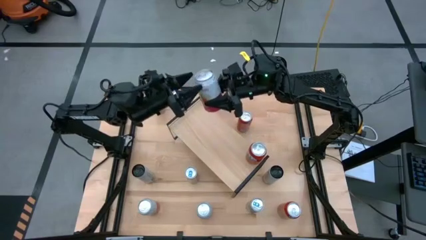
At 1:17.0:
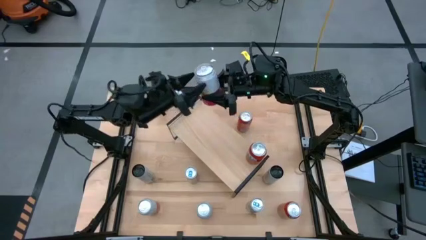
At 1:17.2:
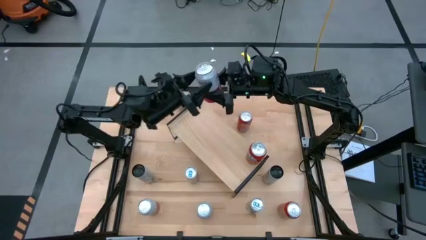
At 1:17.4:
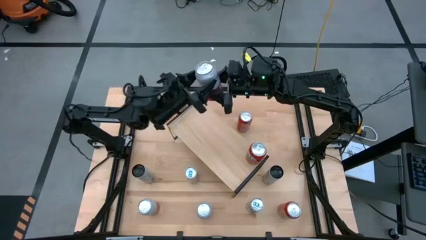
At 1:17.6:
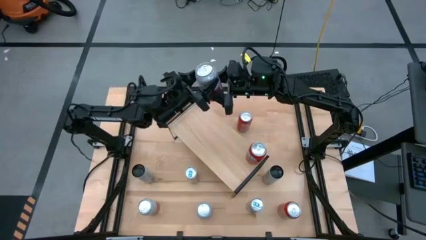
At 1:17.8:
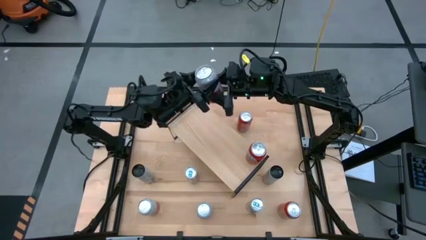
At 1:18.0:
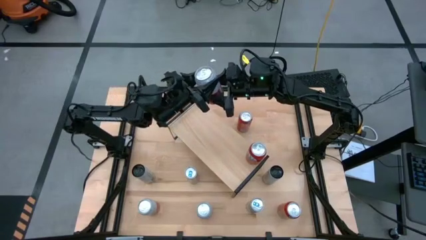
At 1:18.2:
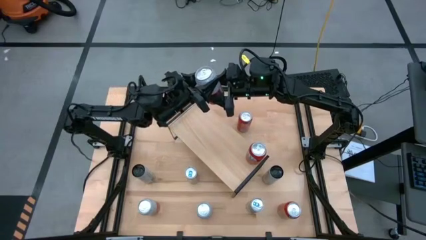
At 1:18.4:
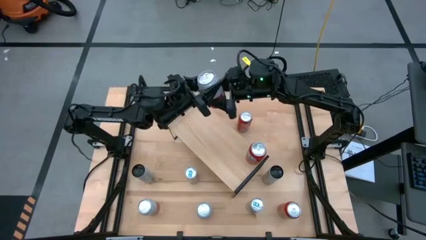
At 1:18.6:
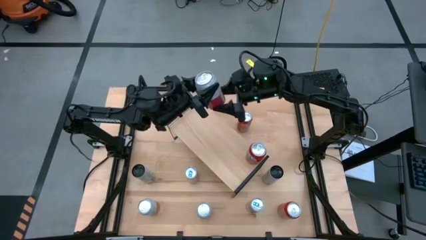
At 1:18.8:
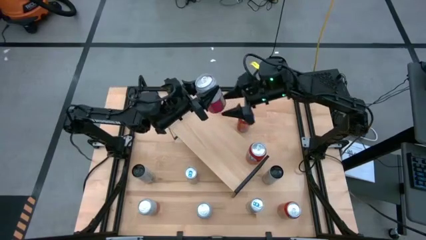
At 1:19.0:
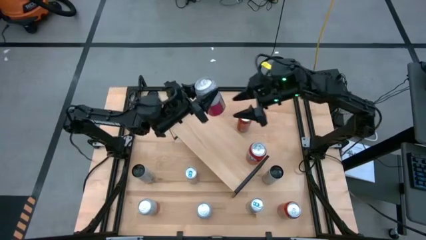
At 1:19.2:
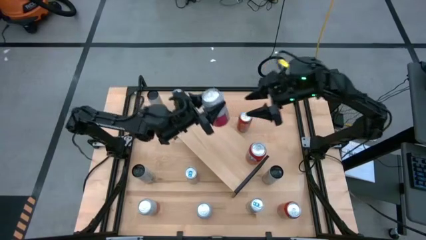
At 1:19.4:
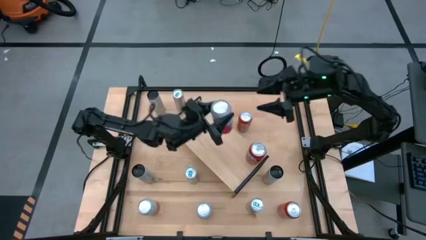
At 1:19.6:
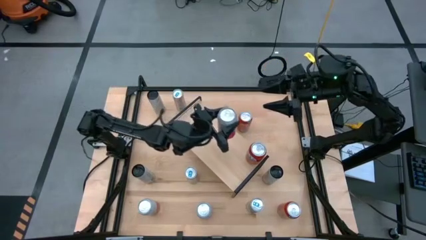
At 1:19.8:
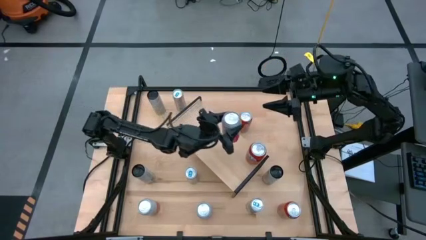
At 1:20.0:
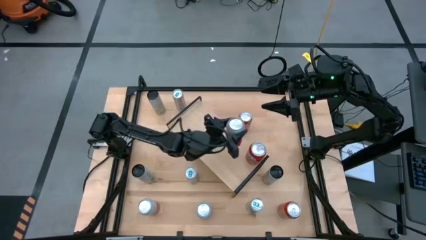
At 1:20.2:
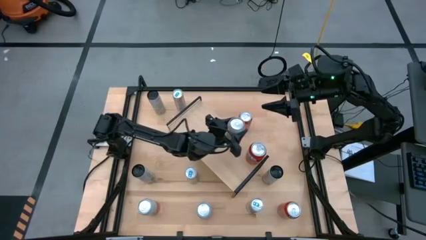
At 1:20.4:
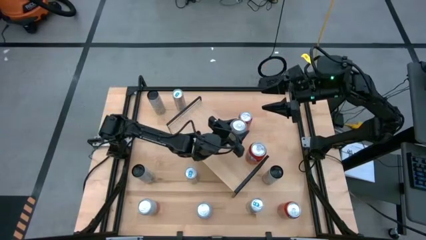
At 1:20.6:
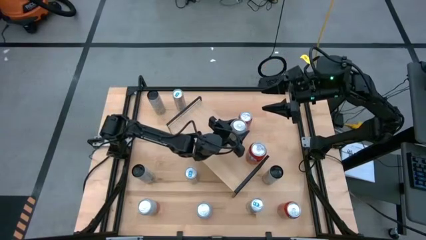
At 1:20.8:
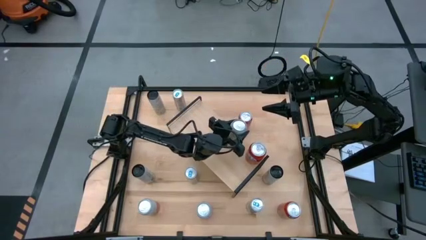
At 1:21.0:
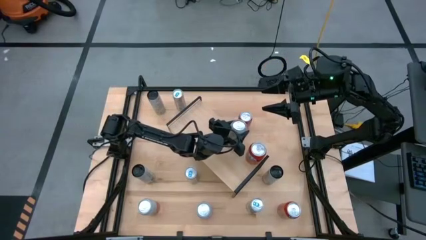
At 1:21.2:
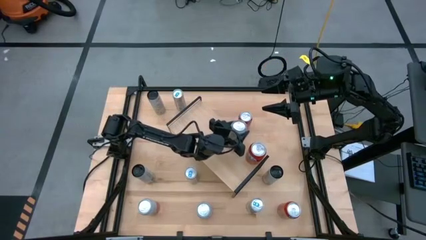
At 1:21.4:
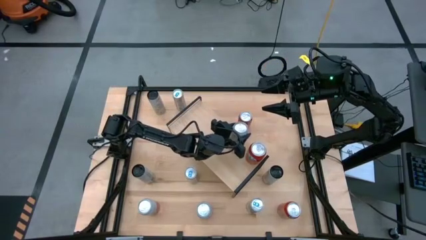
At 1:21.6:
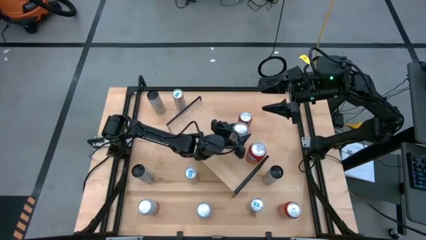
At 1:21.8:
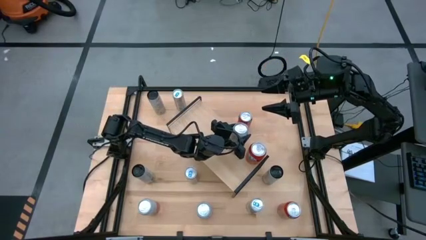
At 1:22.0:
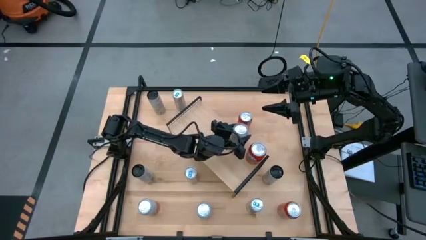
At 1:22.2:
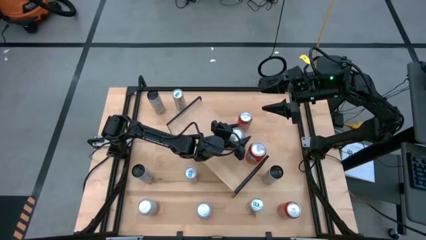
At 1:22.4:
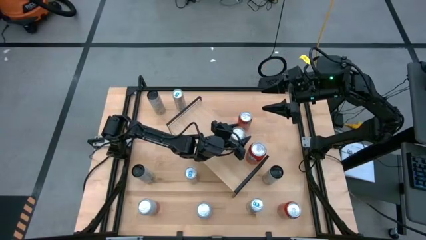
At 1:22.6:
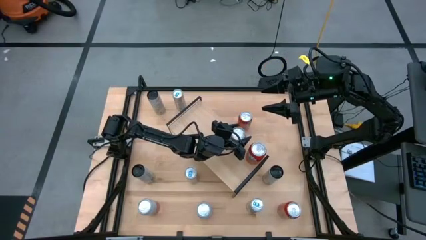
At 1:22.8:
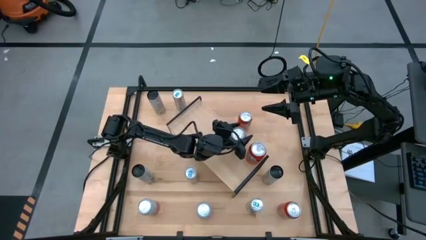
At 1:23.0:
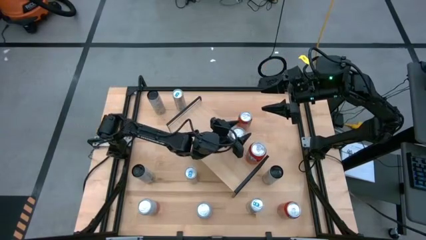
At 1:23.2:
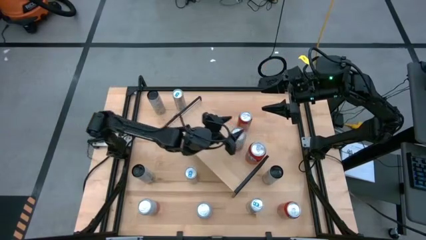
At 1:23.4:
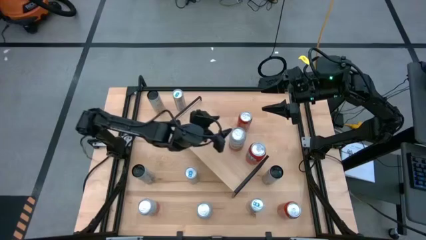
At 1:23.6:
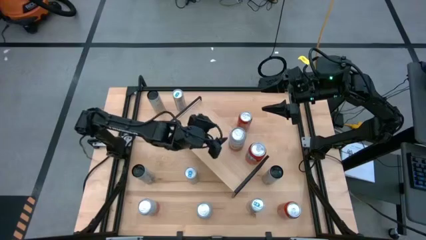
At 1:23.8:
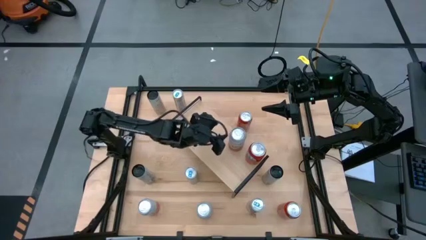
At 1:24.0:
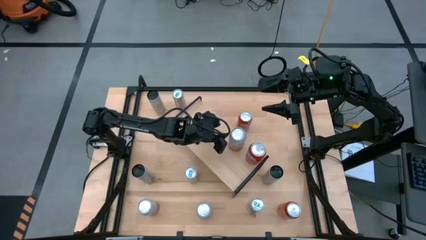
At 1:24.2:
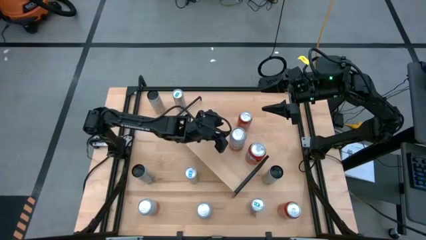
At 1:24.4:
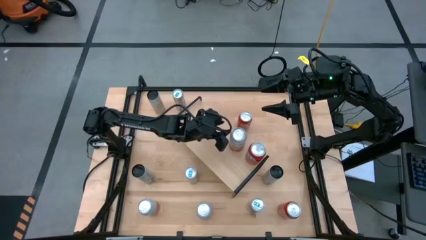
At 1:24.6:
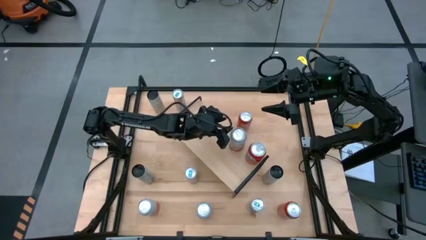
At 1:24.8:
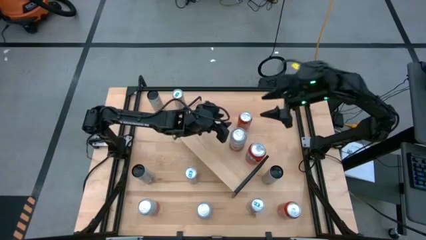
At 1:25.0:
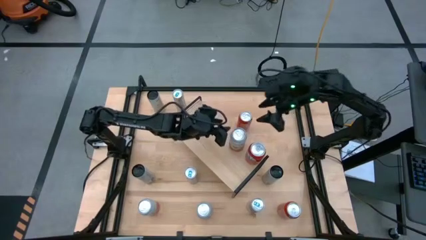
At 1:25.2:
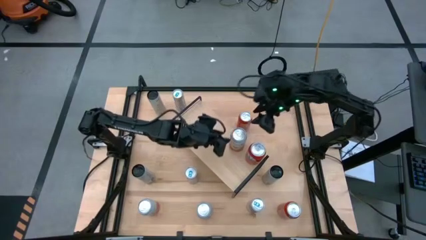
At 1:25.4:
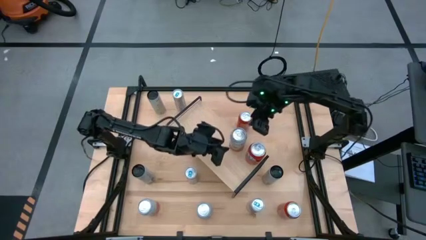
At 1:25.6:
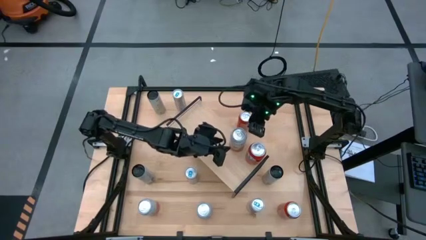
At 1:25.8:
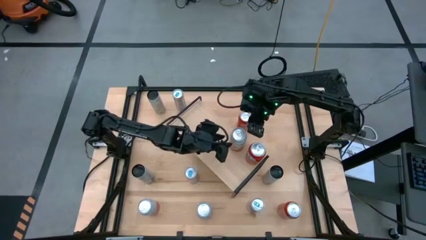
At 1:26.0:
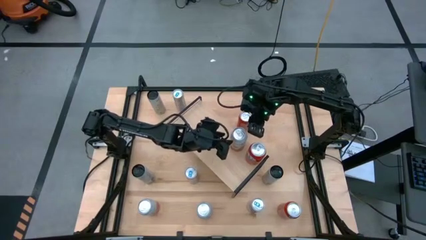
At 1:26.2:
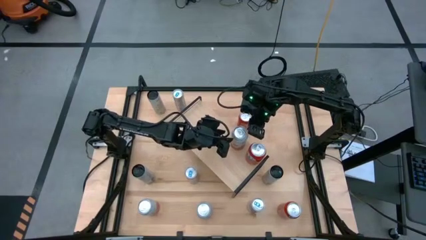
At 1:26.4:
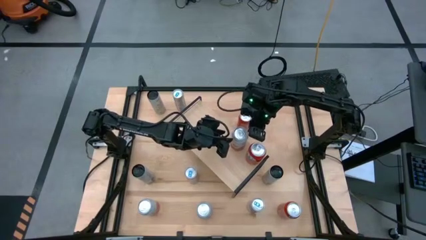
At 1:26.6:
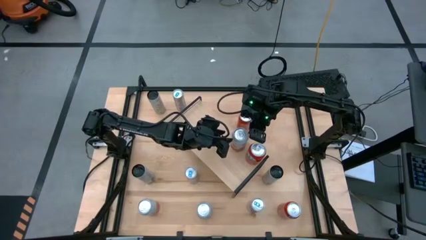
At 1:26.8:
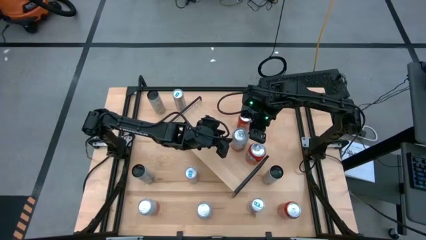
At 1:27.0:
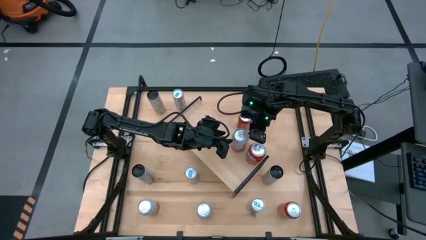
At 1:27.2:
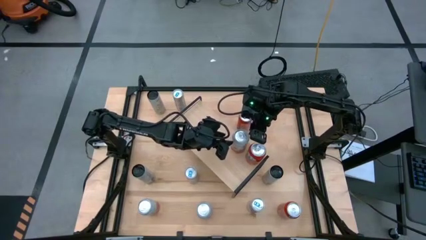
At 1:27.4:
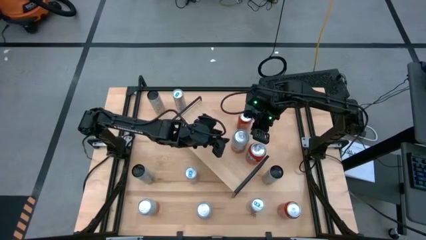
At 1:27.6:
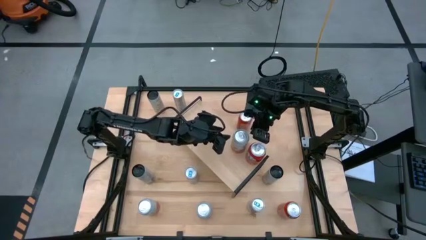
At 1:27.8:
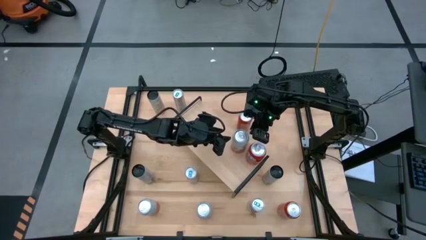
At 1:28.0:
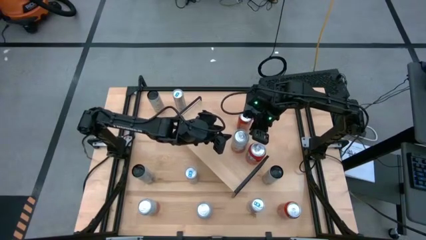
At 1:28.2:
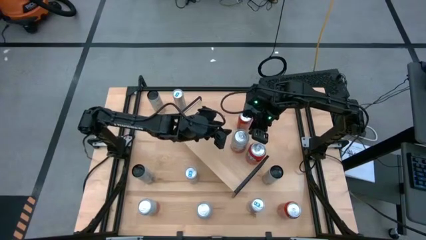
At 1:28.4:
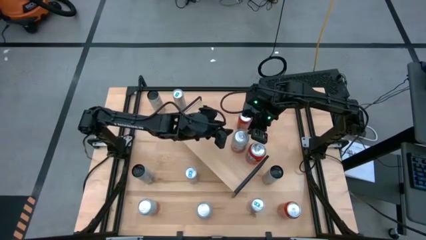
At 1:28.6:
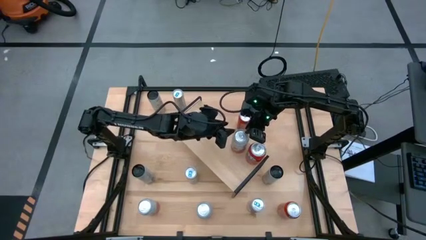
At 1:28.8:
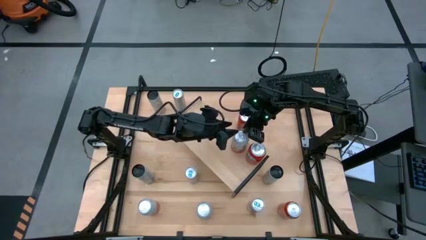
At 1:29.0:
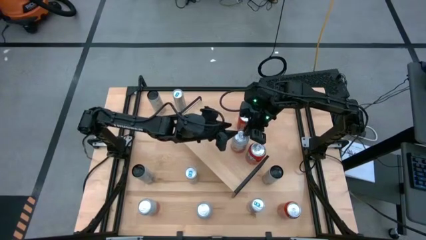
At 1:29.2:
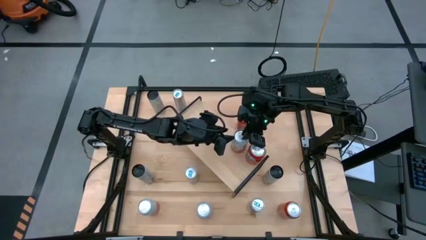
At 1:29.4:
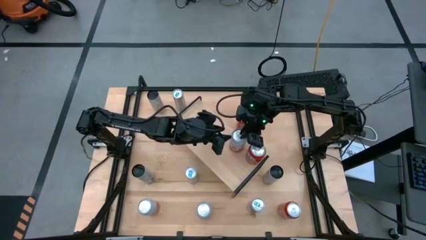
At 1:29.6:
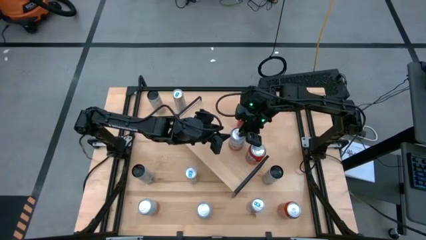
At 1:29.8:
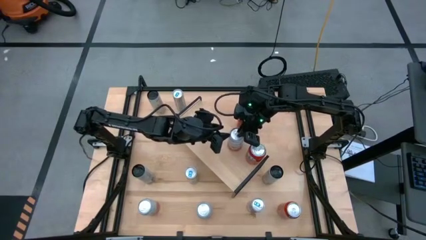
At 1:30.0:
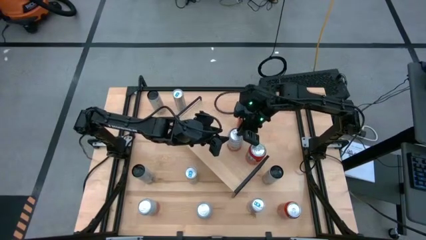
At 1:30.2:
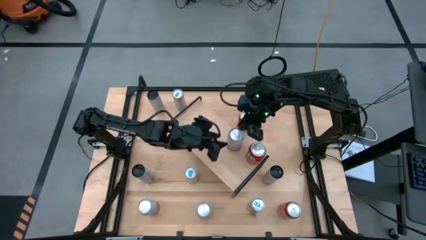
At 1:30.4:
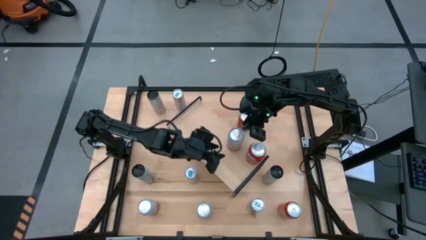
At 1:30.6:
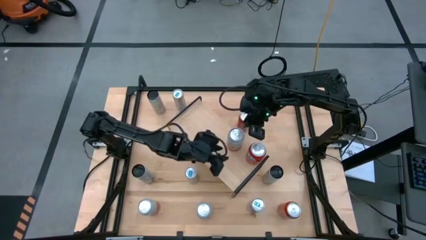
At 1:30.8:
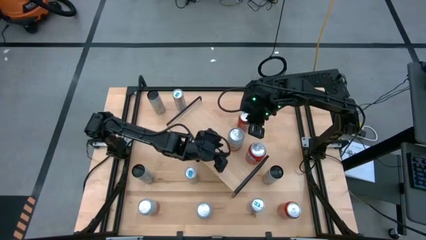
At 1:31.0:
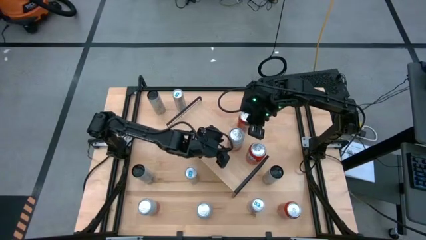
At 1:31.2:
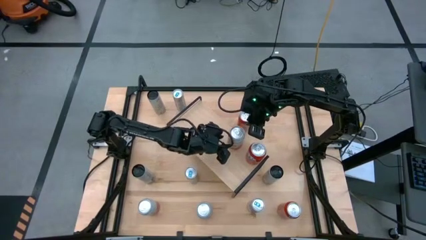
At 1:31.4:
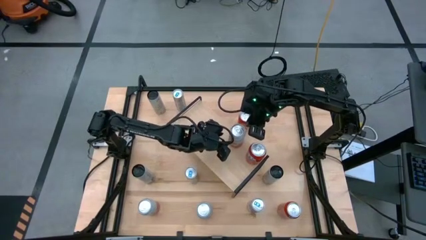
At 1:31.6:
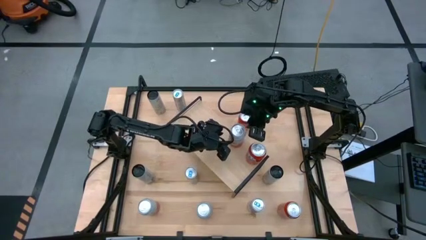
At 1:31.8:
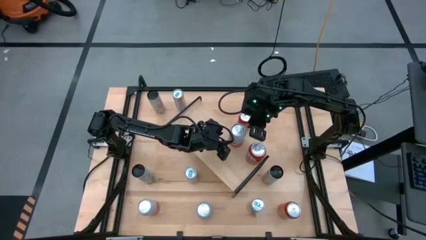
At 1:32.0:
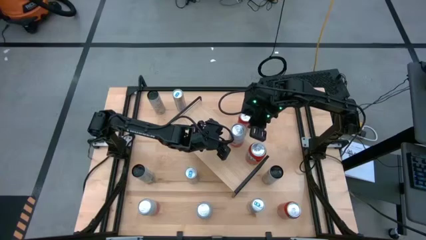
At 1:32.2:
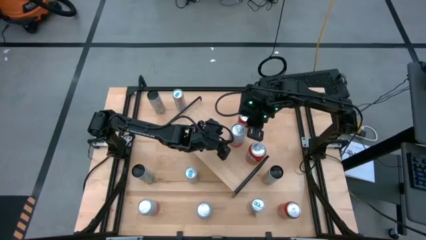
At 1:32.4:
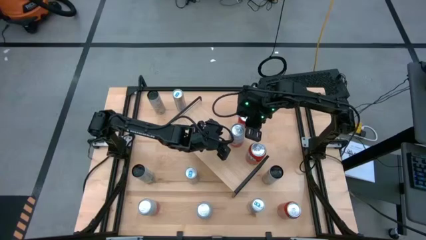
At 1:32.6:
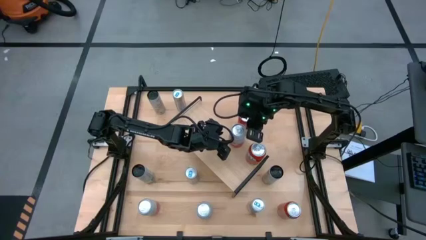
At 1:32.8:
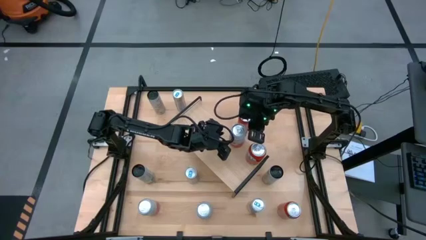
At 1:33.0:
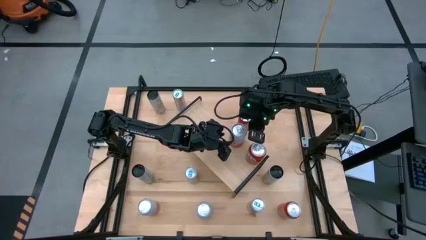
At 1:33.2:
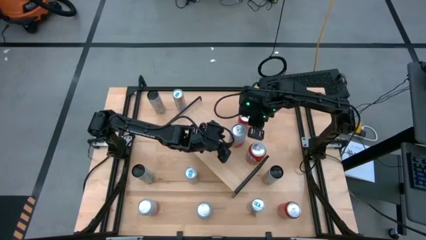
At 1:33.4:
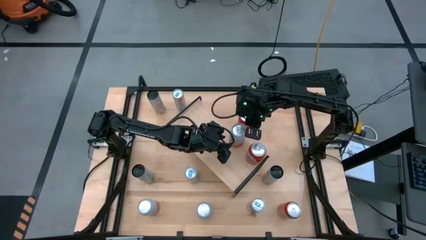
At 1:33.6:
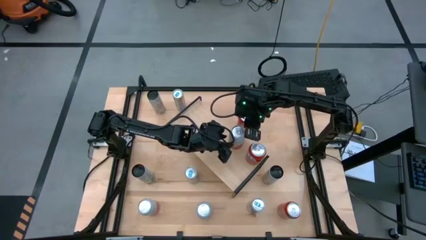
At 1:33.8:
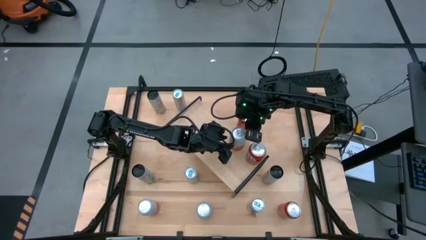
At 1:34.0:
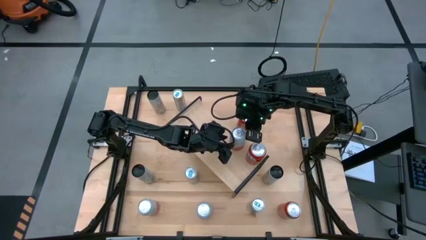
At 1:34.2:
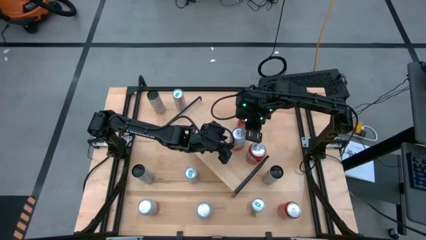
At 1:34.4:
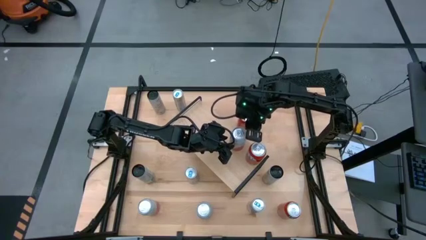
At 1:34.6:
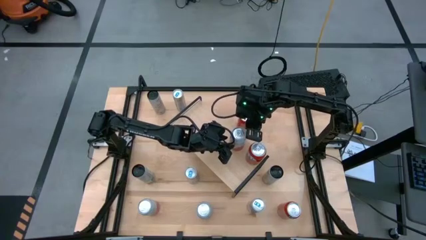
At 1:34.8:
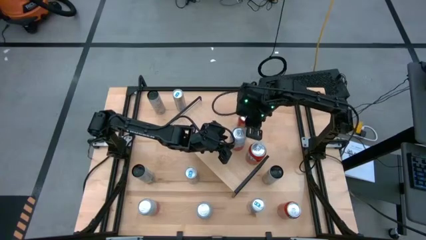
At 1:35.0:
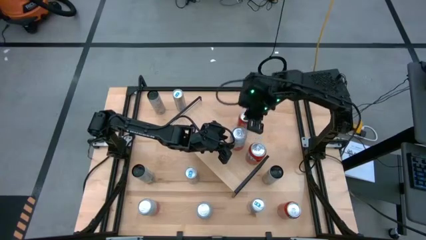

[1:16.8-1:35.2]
Task: Place canned beverage on shelf
Put the top pink white soda can on the shelf
